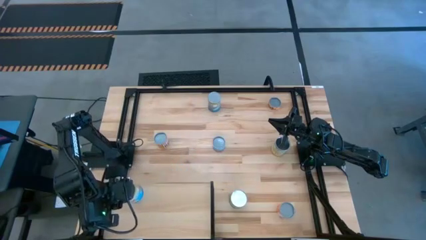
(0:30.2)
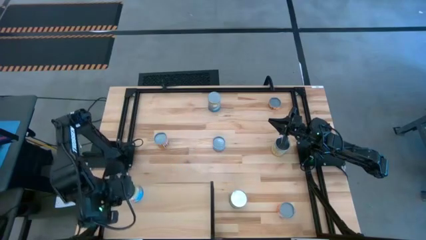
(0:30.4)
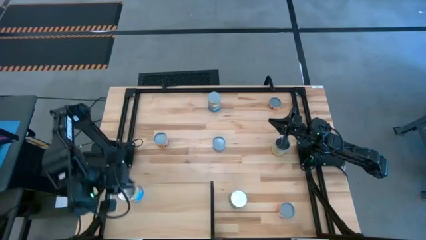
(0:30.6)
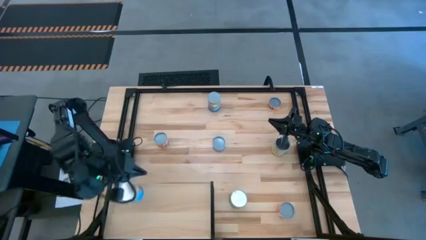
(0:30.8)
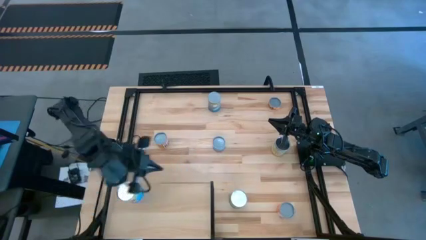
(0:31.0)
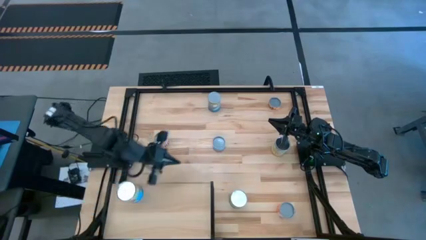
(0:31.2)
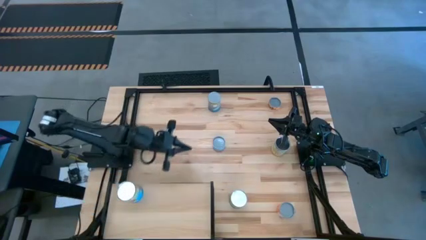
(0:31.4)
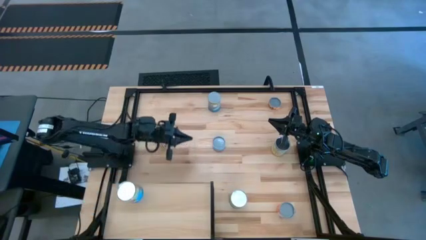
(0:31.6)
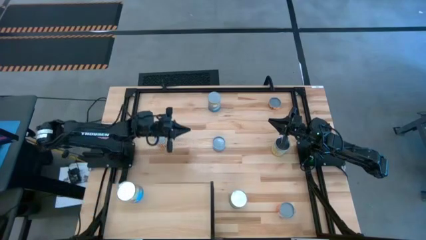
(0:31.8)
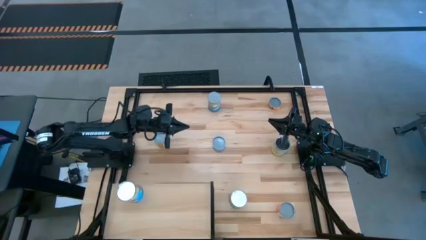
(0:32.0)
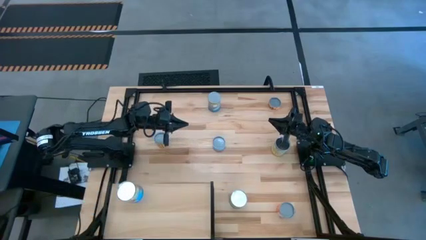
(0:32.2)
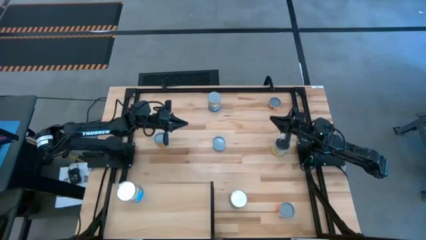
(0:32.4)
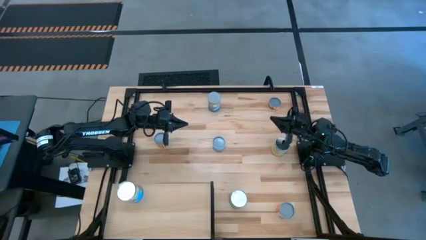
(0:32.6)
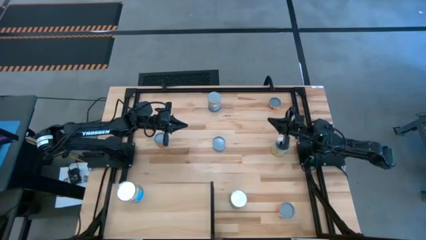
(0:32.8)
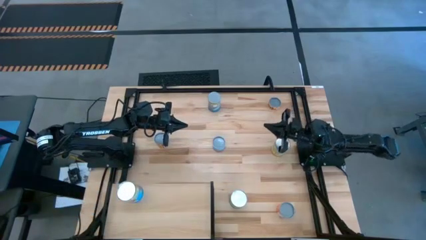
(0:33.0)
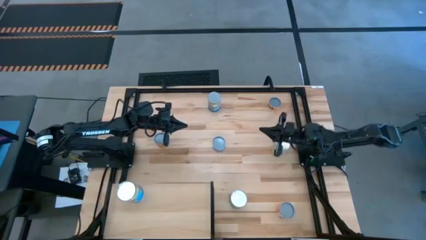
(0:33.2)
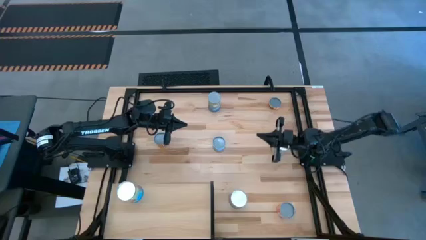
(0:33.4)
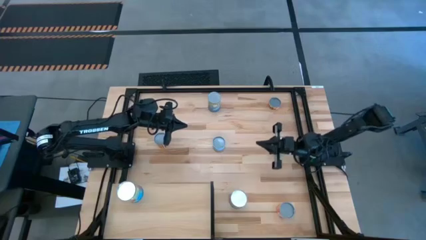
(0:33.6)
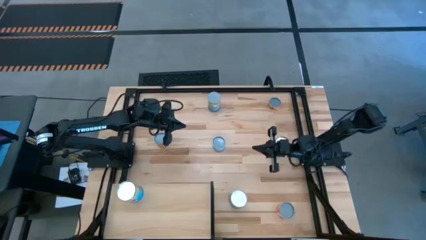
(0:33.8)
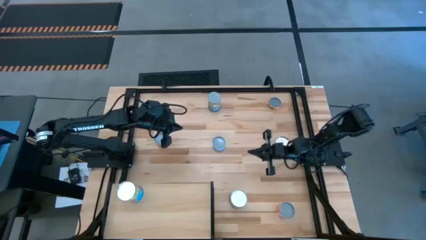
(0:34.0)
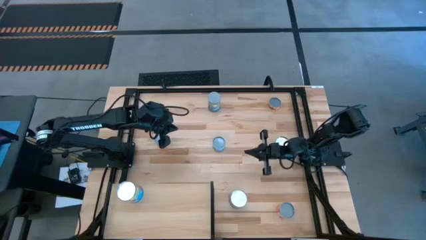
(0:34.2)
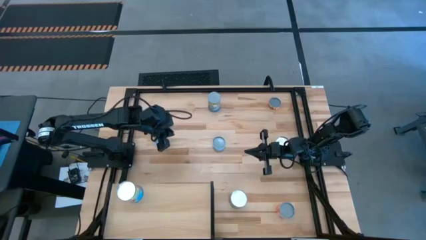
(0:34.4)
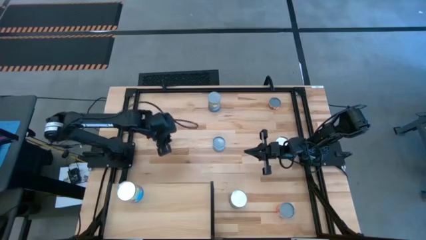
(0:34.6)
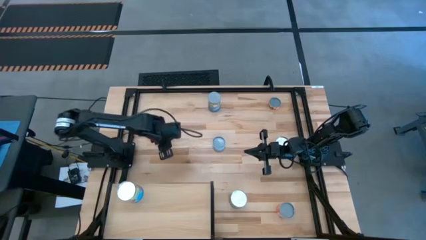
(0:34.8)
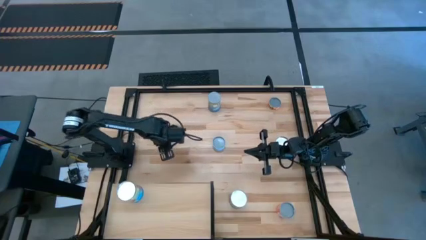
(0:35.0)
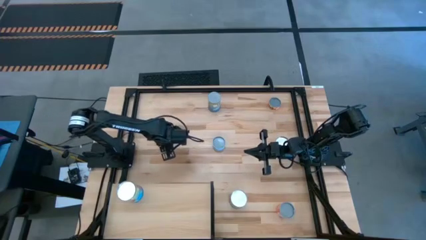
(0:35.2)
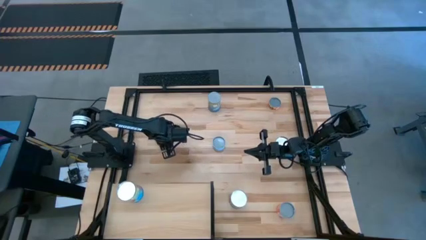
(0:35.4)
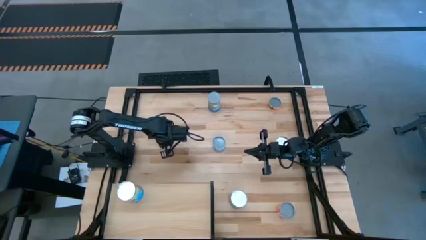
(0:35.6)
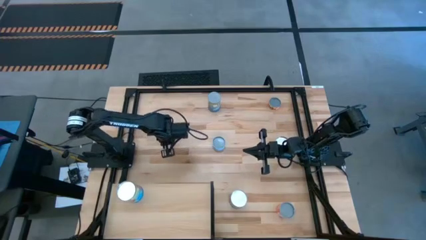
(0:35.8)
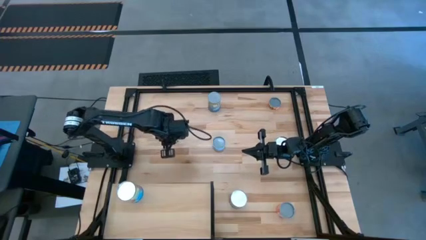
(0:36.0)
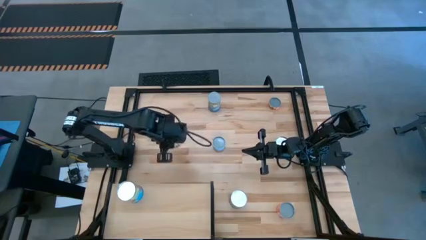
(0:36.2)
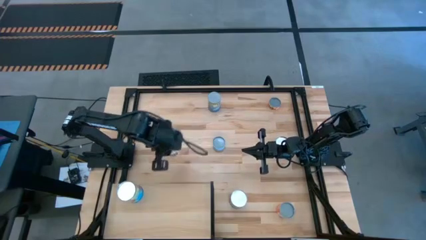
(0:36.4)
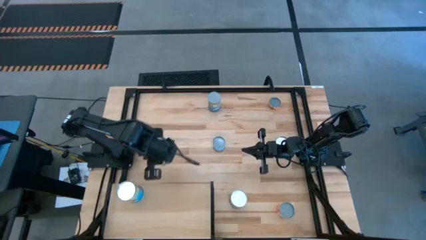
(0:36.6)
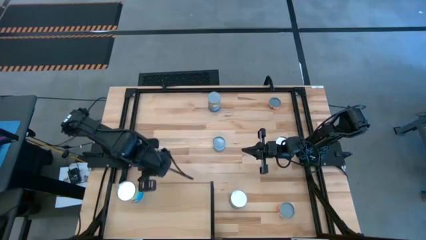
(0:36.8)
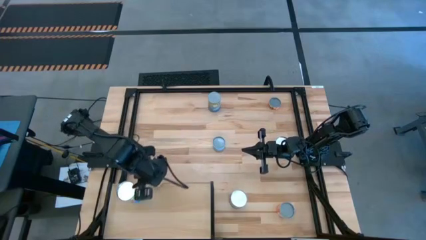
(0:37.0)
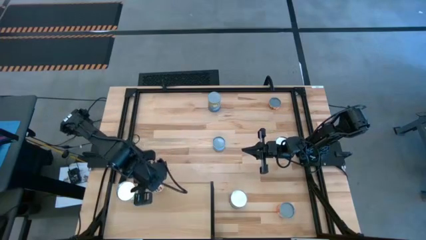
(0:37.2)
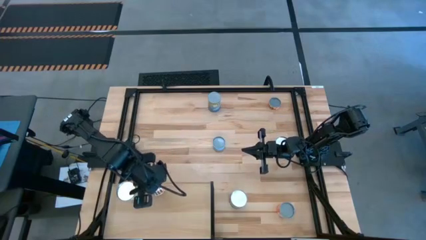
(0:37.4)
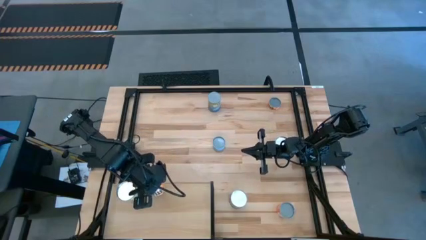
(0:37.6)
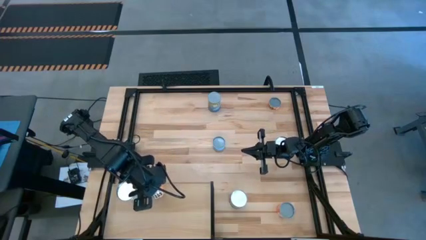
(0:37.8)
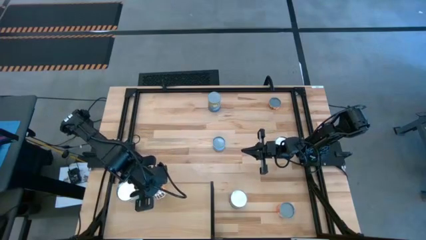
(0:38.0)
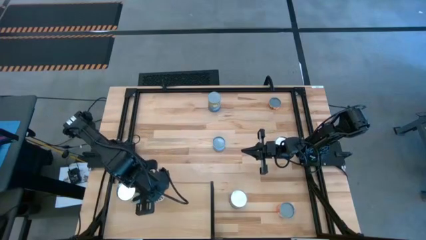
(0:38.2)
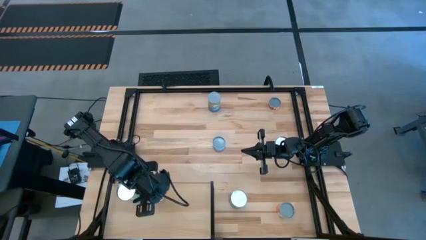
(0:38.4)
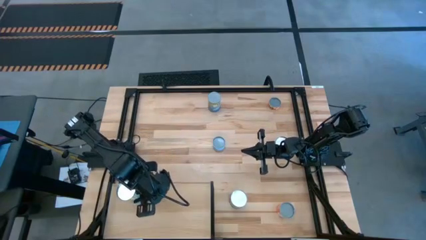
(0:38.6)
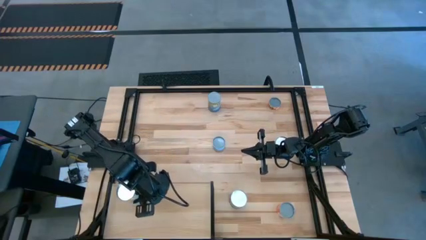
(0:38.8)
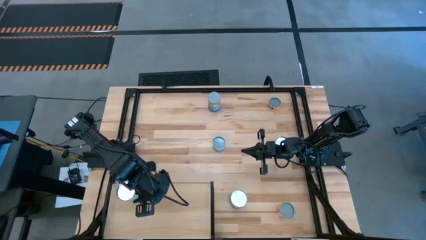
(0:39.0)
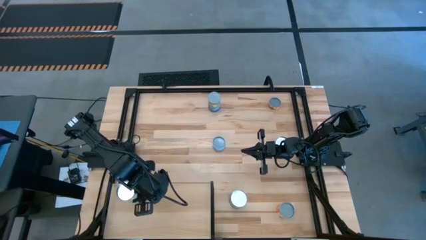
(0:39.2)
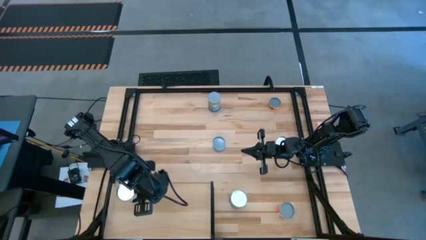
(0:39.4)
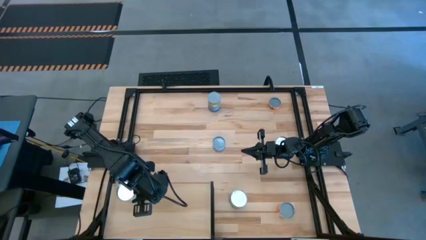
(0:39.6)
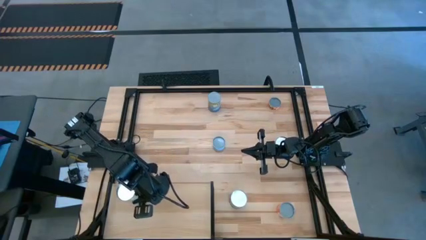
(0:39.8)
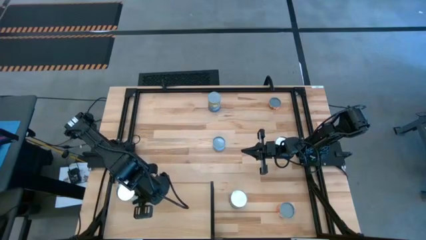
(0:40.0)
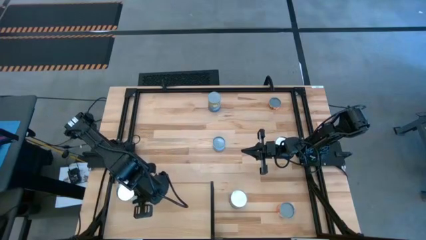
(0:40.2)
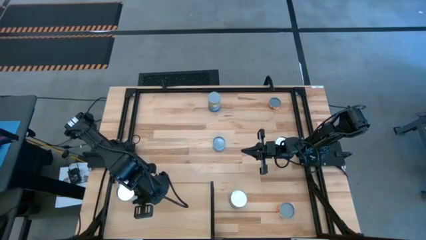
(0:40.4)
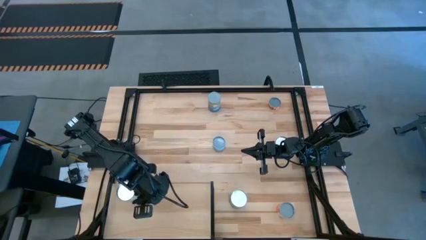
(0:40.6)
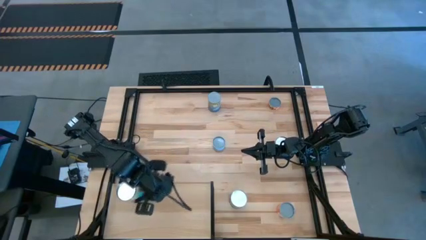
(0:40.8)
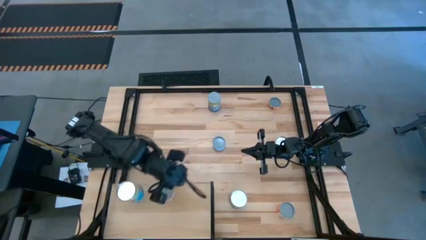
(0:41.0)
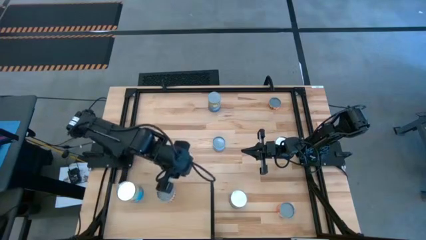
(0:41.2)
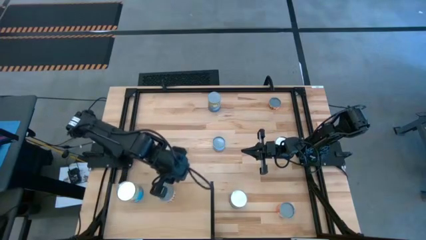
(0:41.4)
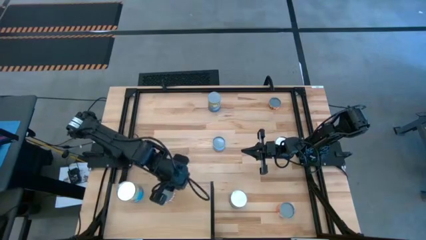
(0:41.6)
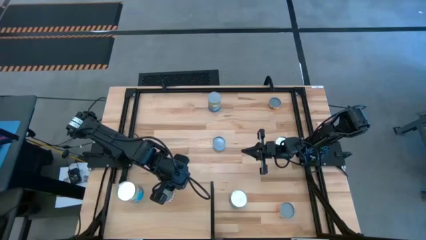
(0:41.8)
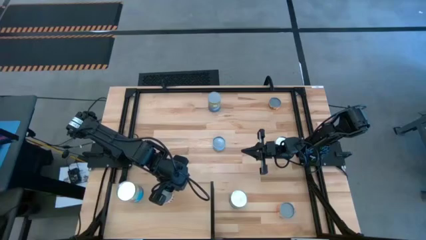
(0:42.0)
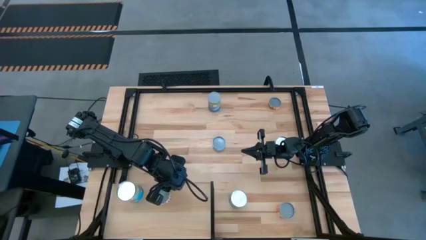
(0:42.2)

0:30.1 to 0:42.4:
Task: Pick and place cans onto a shelf
Put the canned black beans on the shelf
